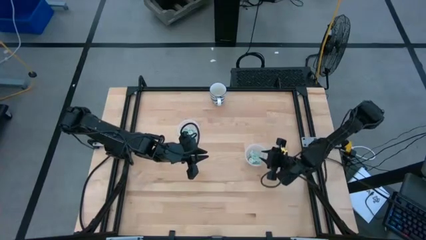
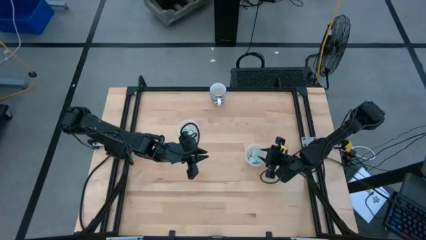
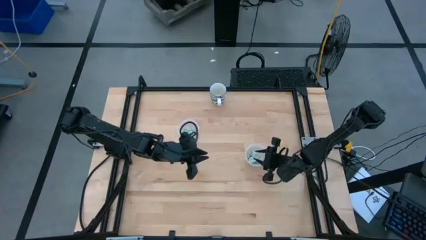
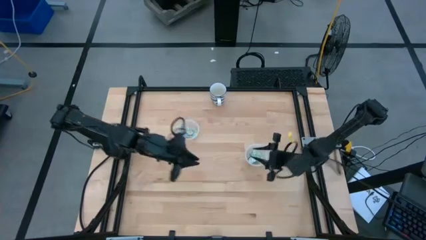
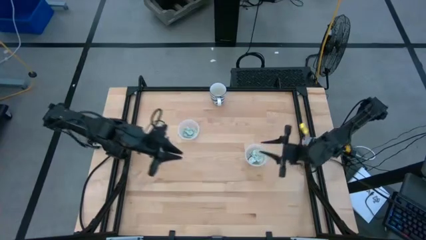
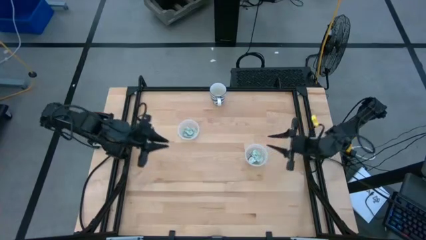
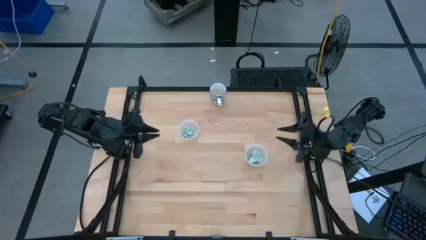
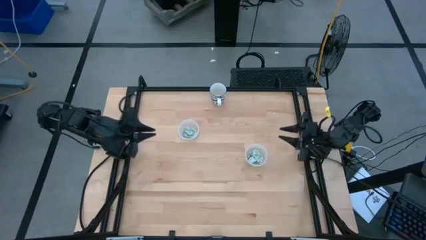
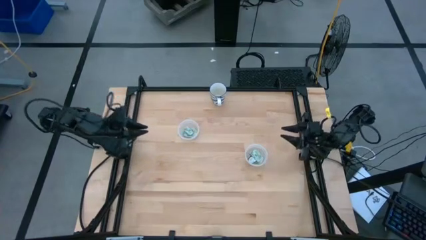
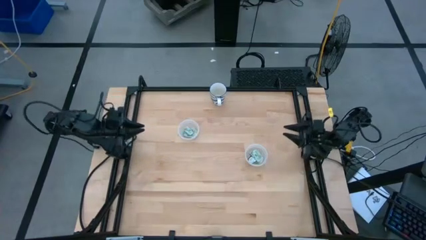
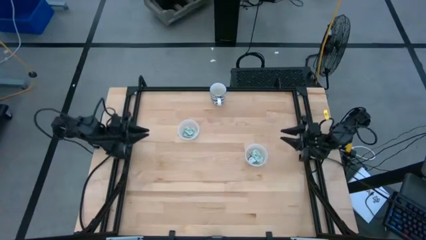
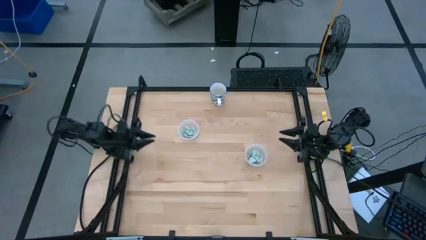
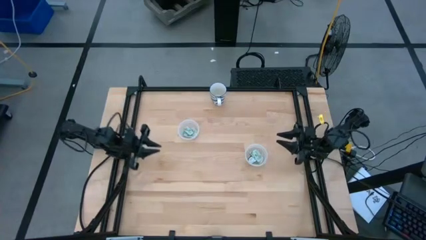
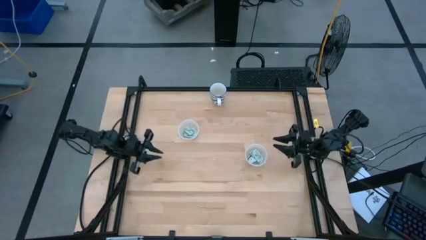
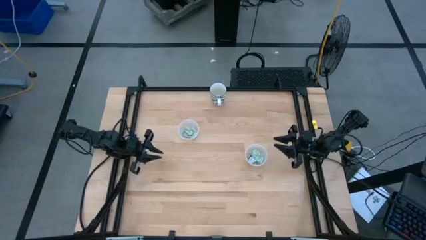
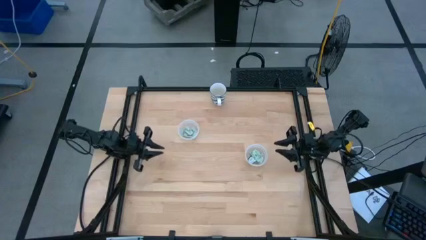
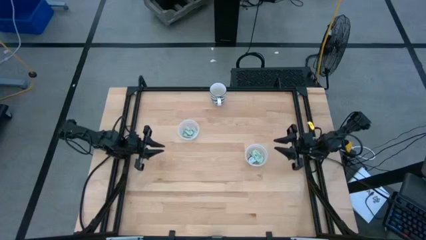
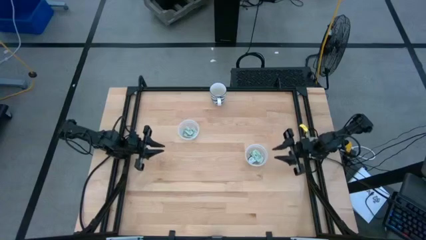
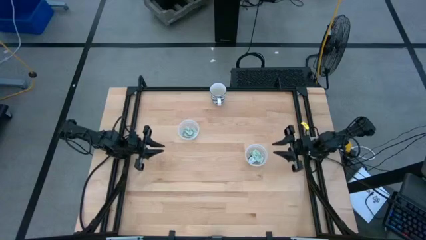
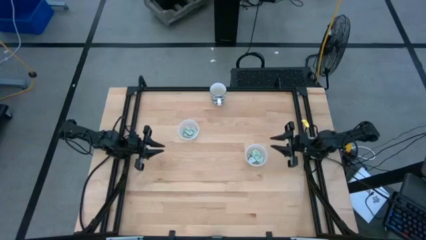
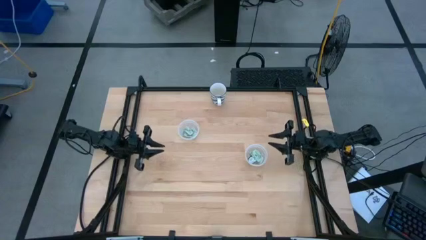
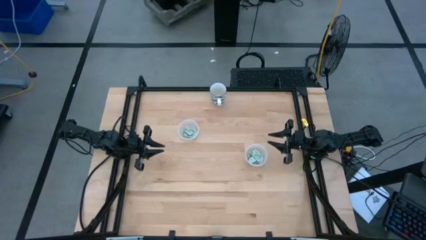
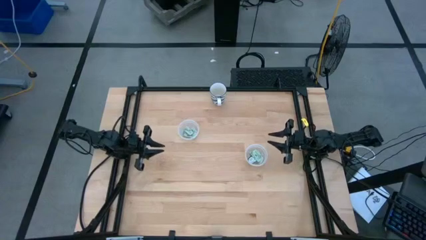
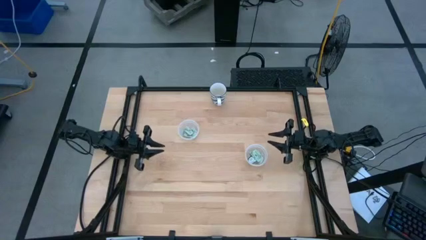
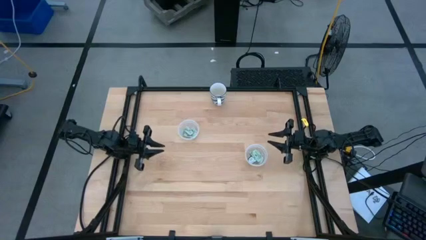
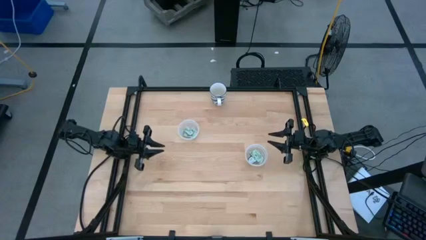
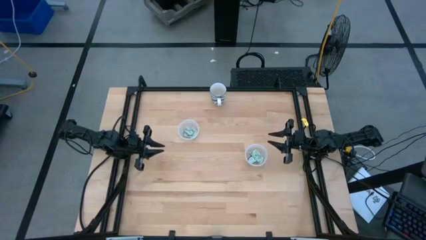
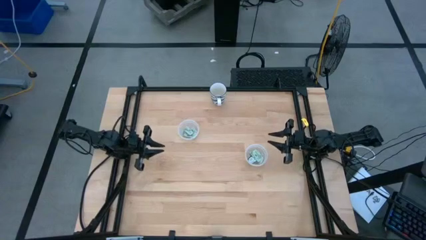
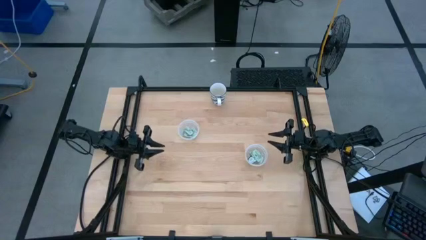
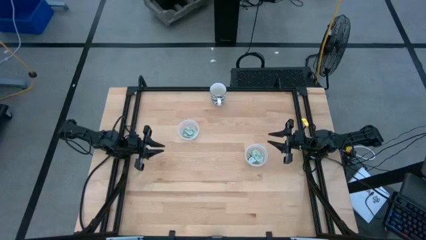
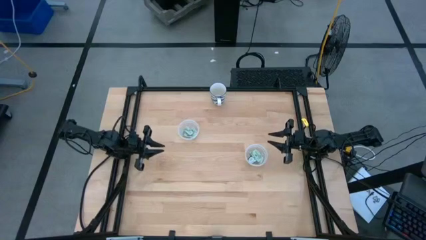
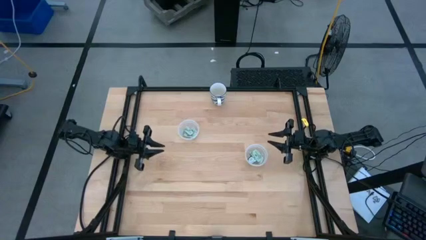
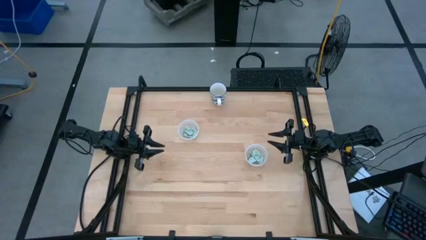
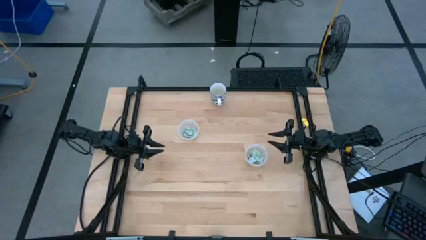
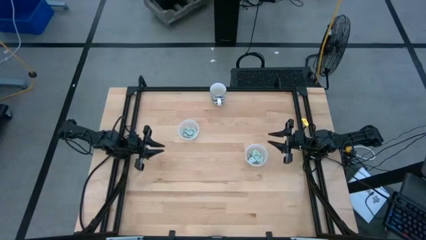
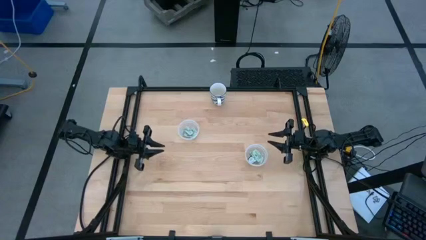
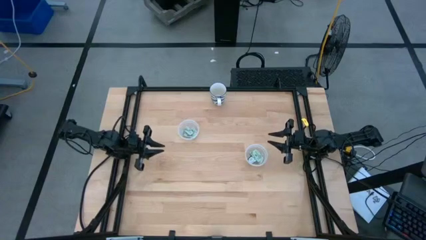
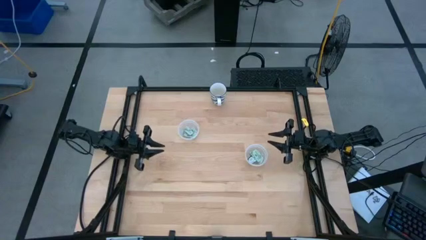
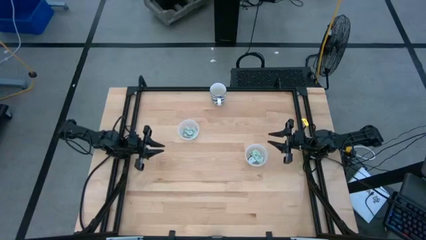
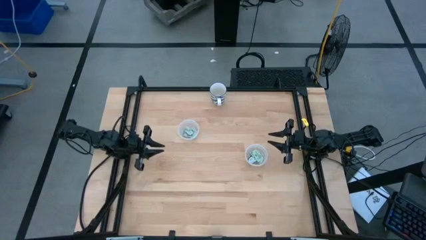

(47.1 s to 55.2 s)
Task: Pick and place Stevia / Truvia into bins
Return to Home Position

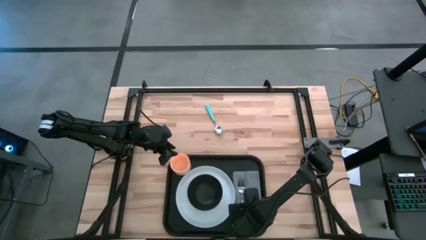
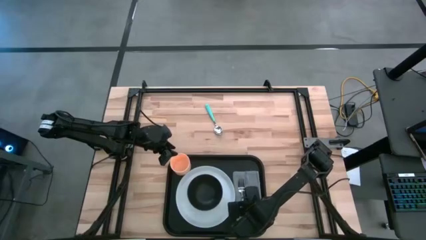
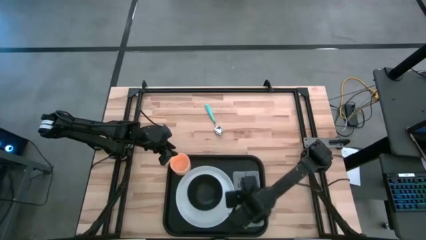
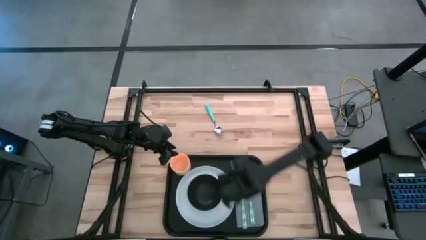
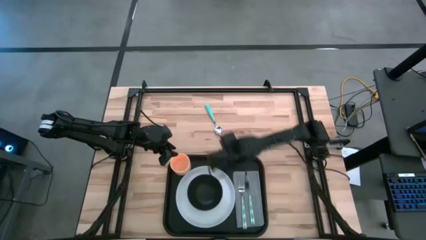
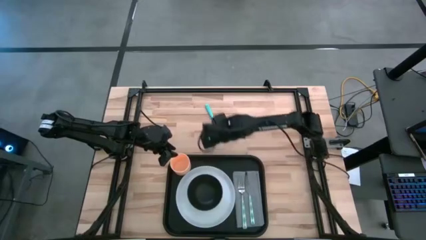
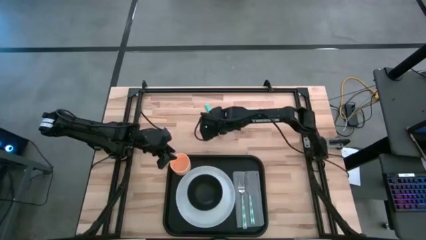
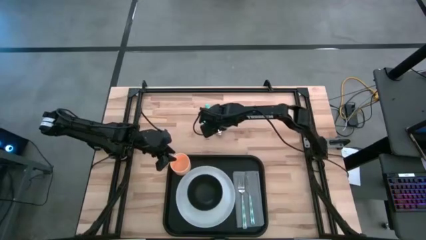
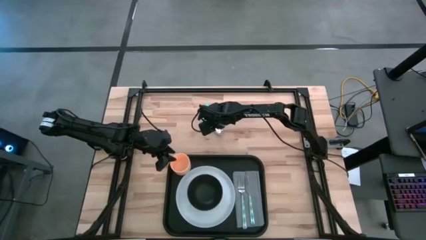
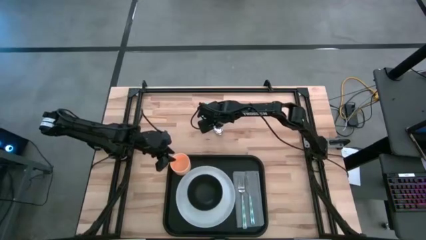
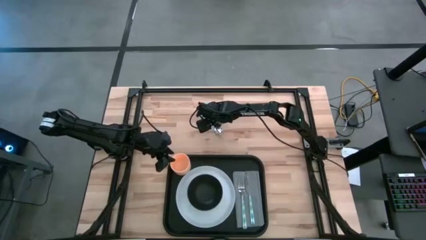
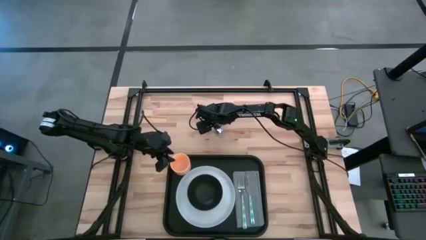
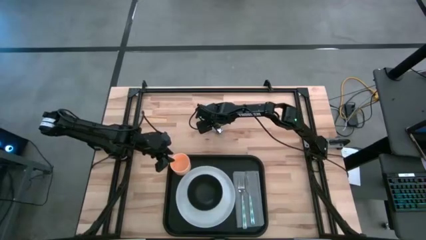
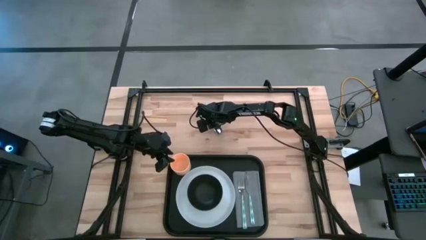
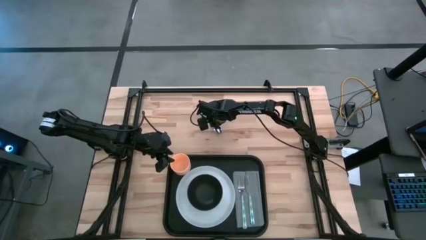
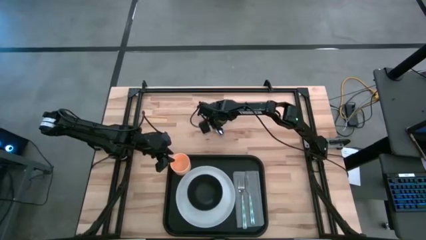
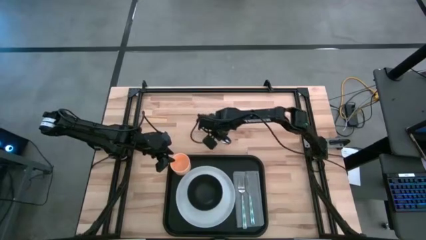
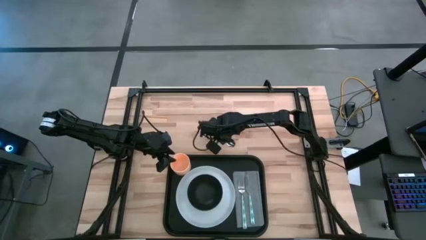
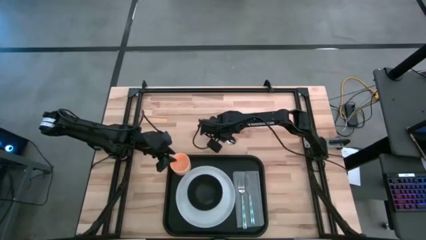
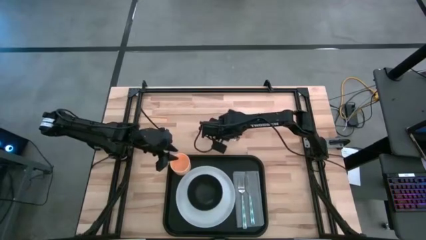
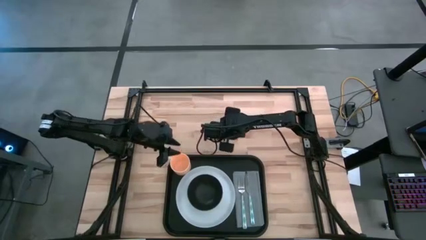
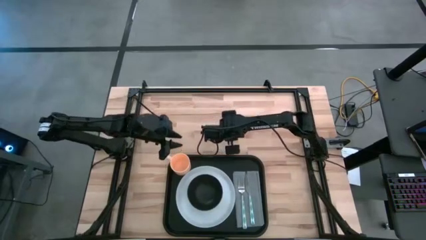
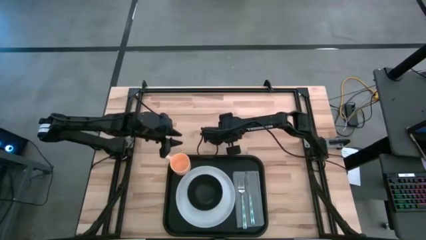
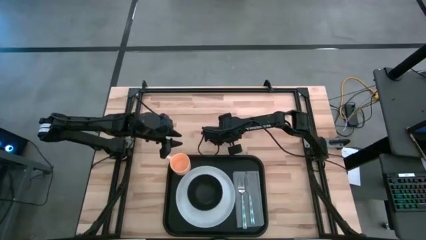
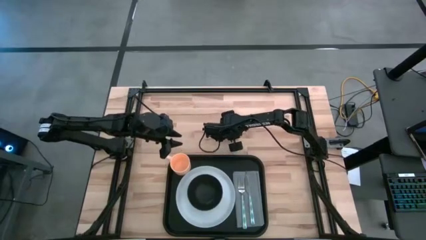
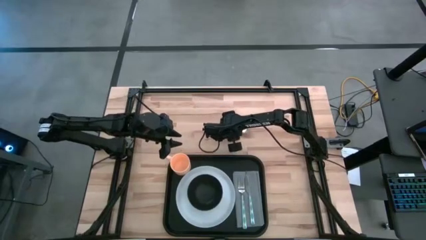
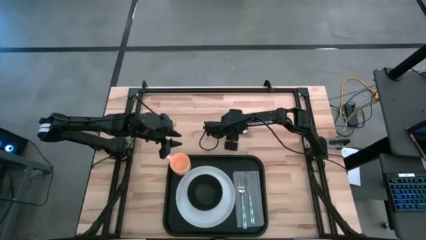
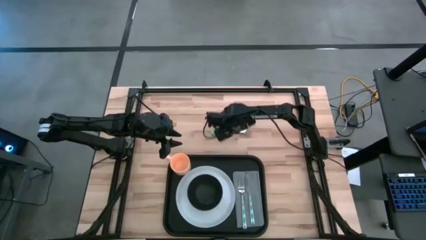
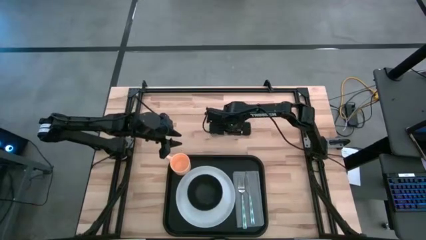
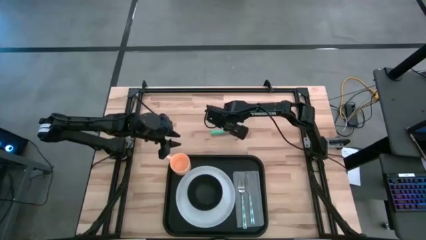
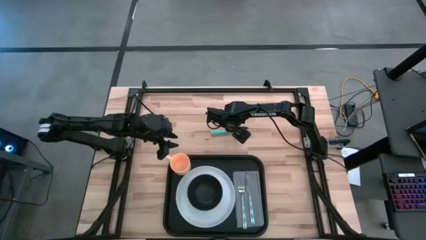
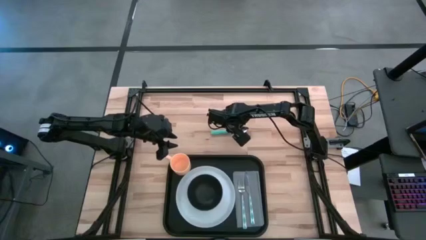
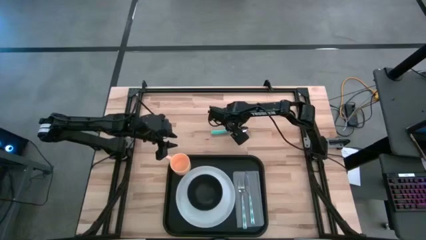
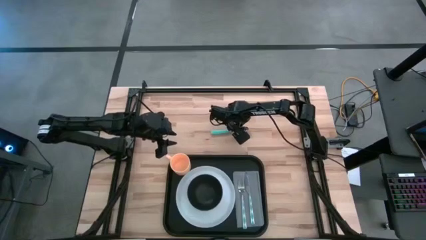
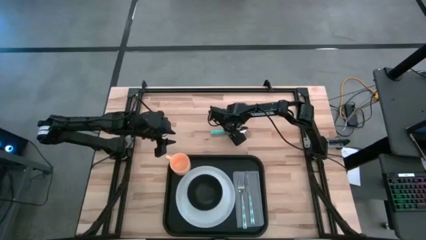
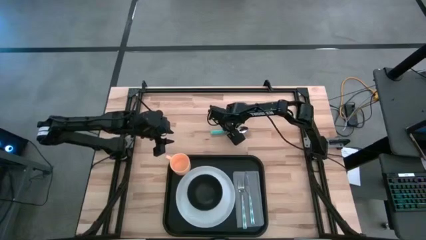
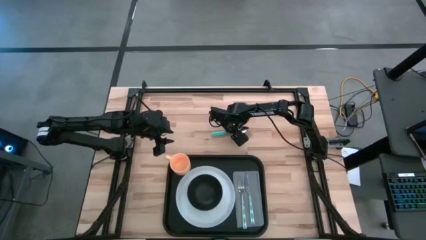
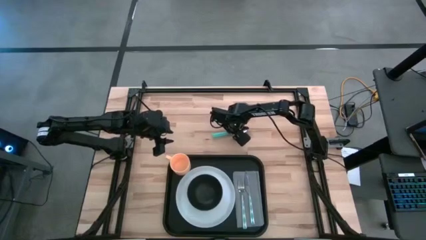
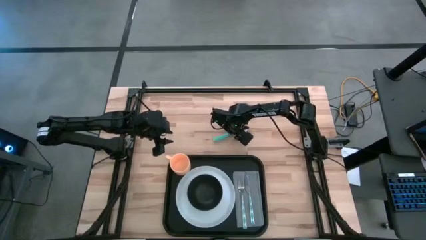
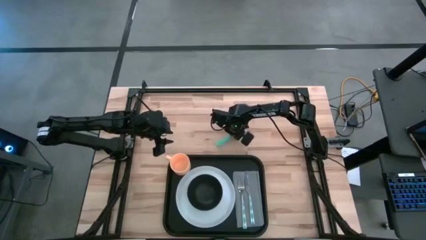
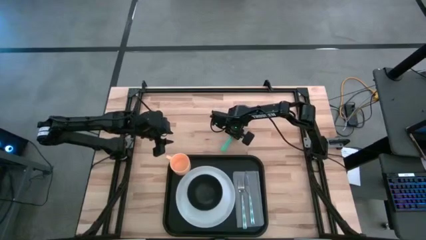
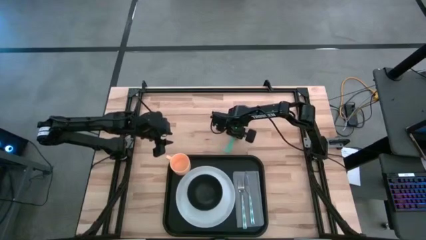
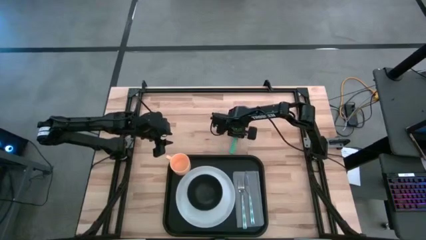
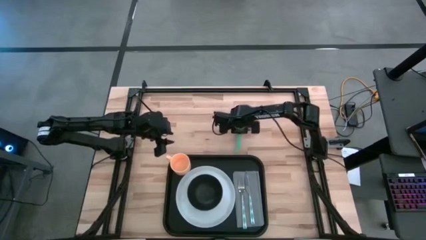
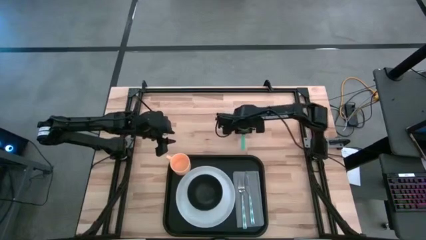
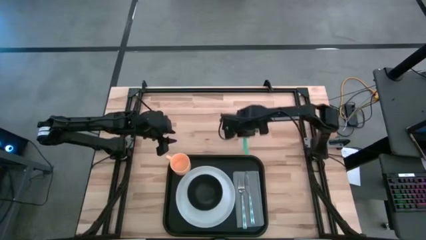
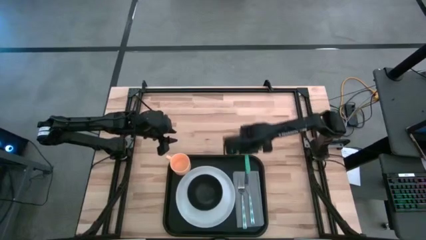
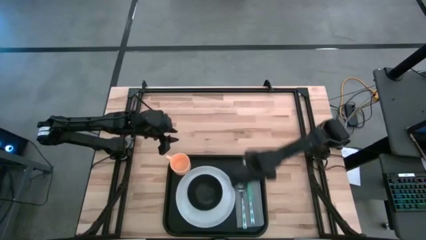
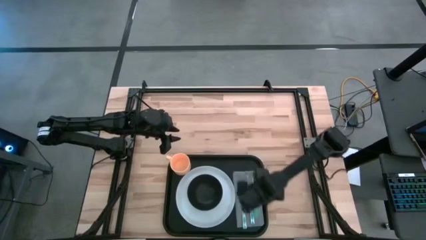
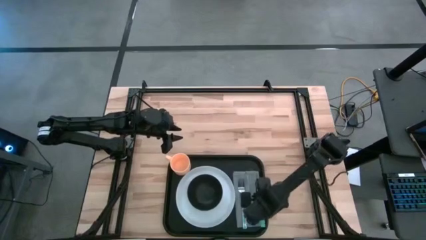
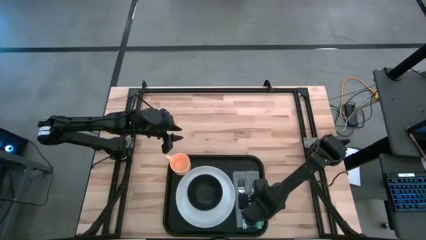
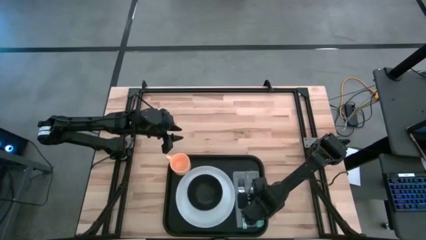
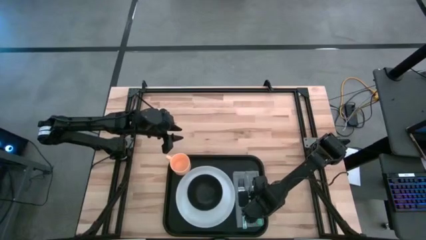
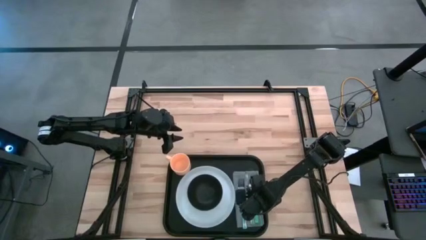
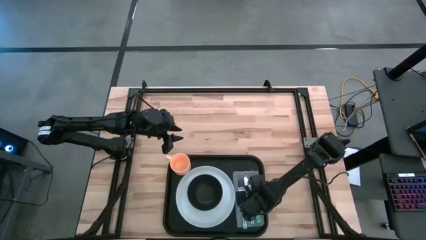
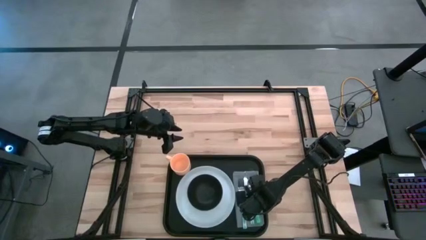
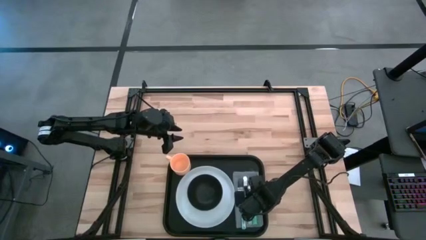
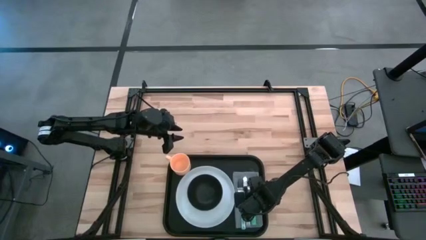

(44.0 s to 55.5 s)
Task: Set up tray
Put the green spoon to the right of the green knife on the gray napkin on the black tray
